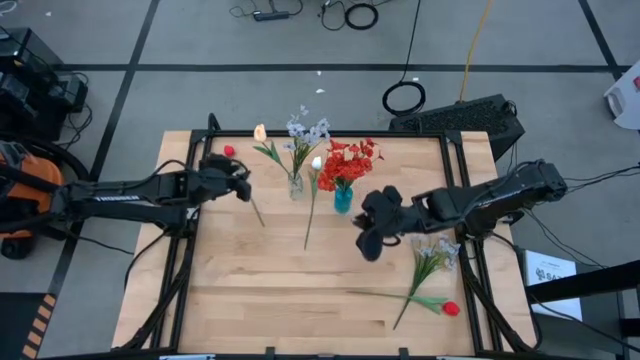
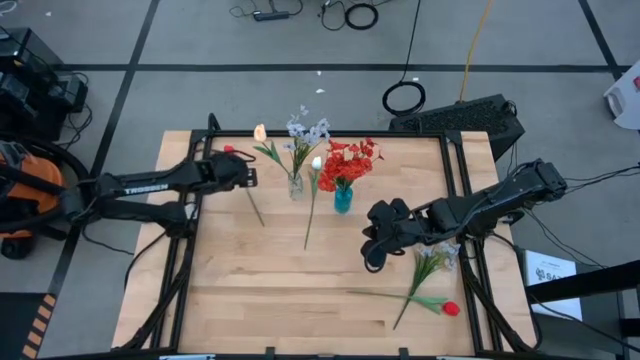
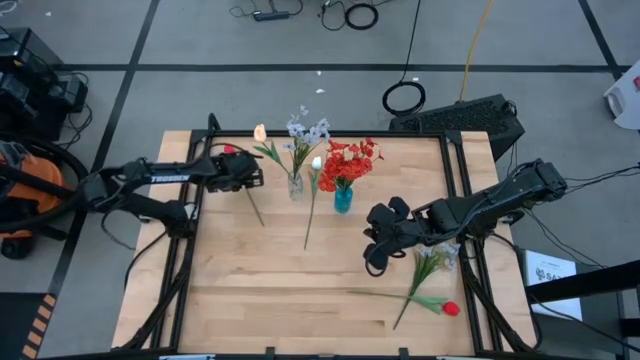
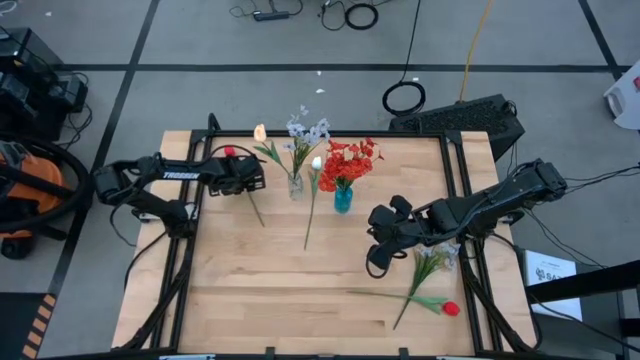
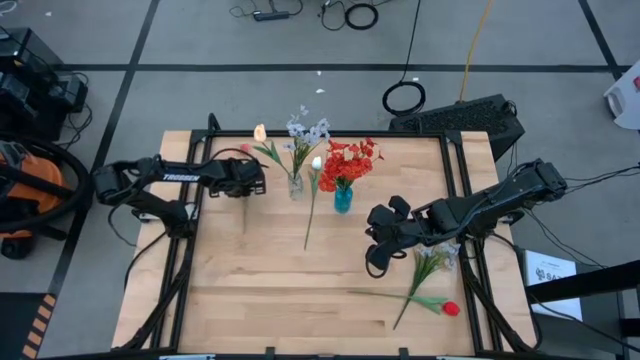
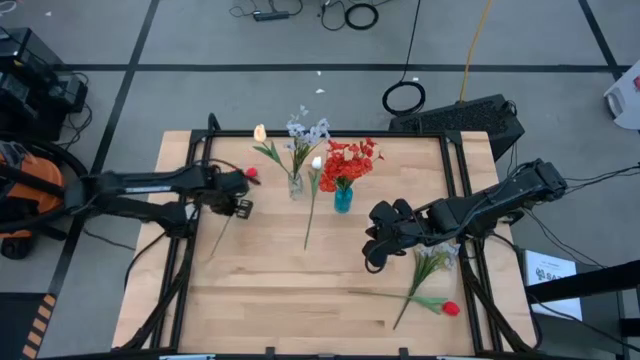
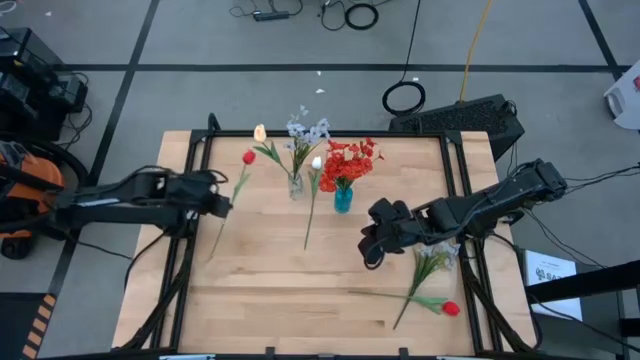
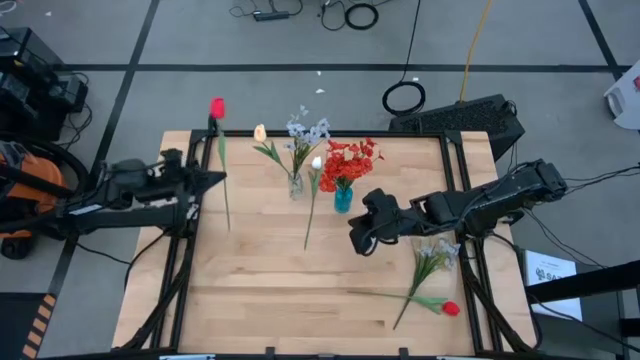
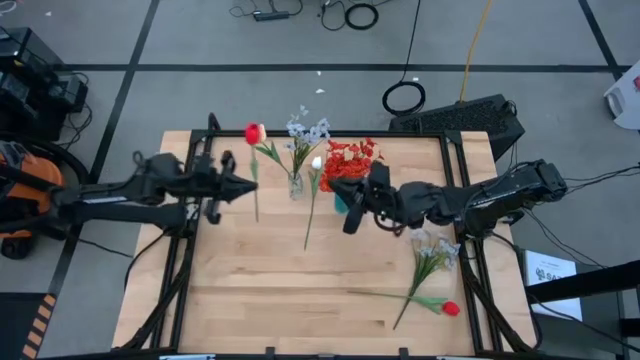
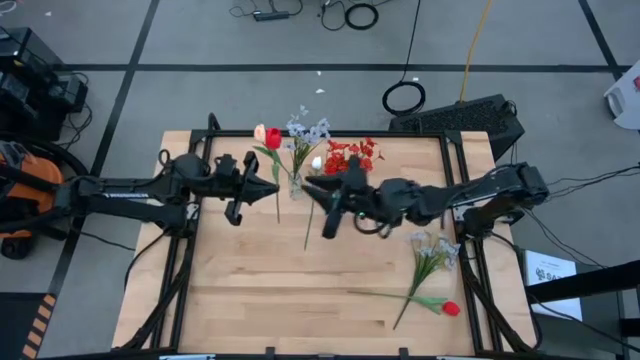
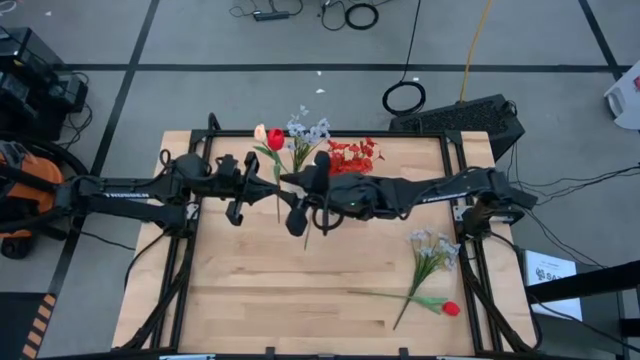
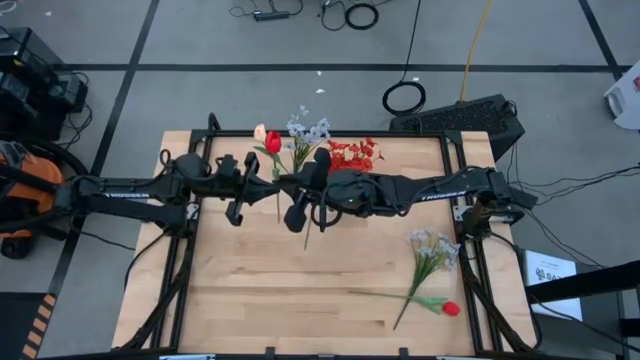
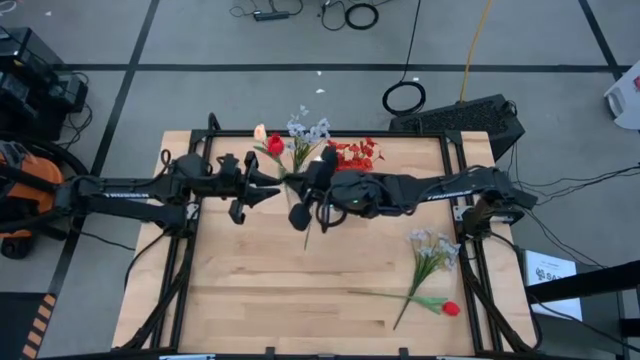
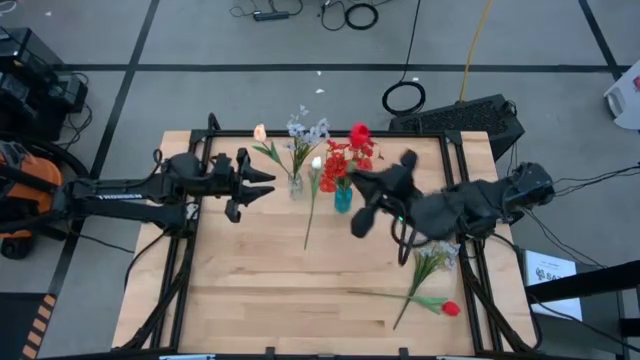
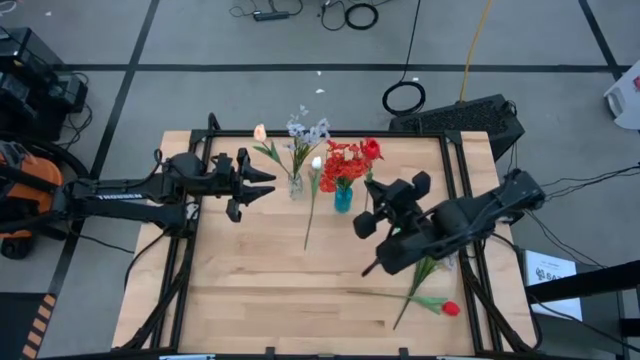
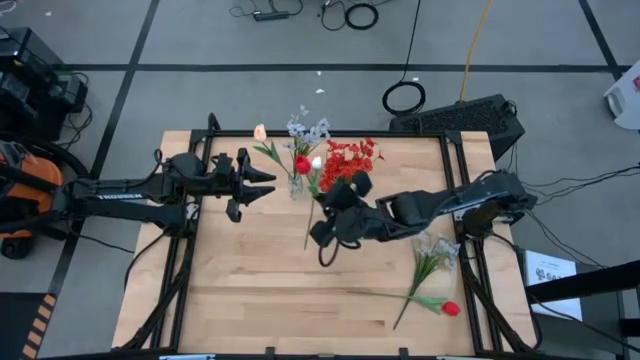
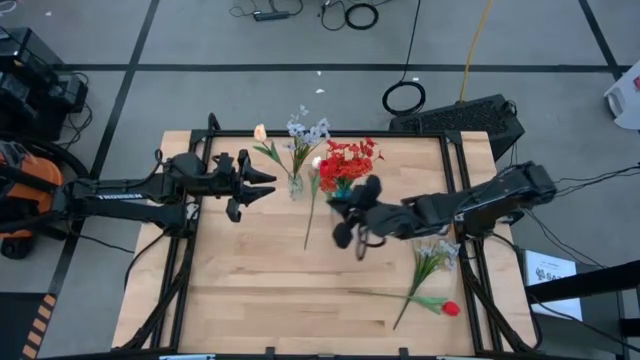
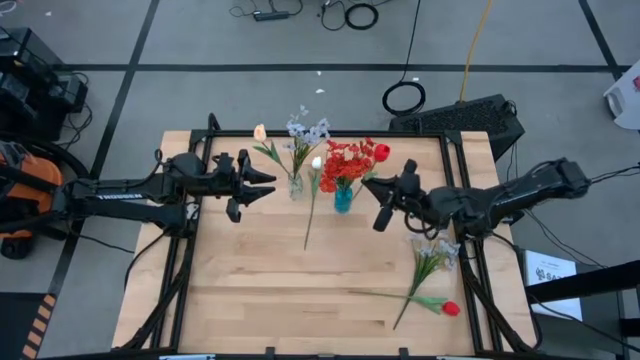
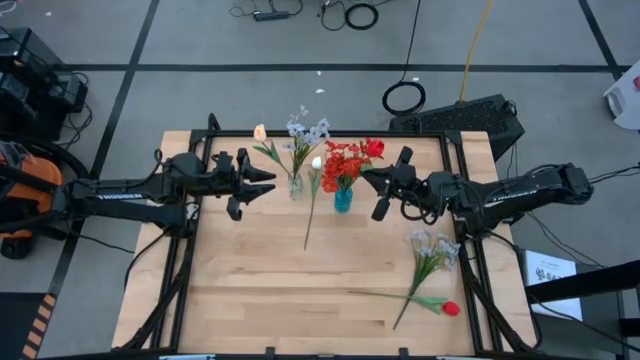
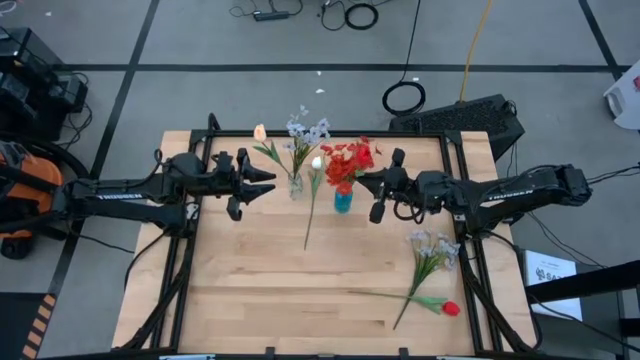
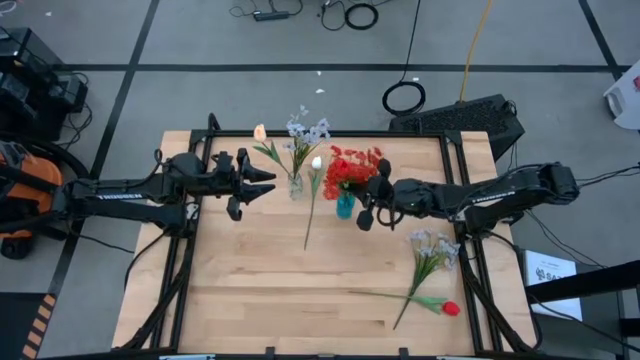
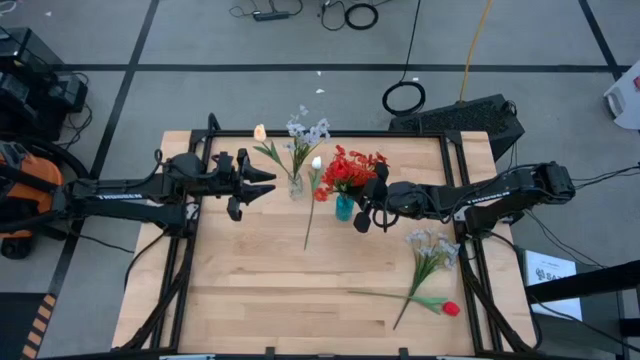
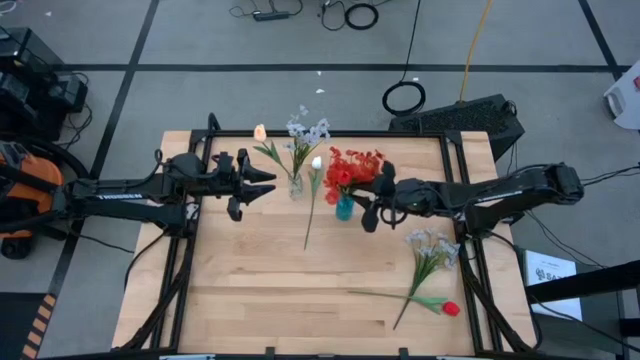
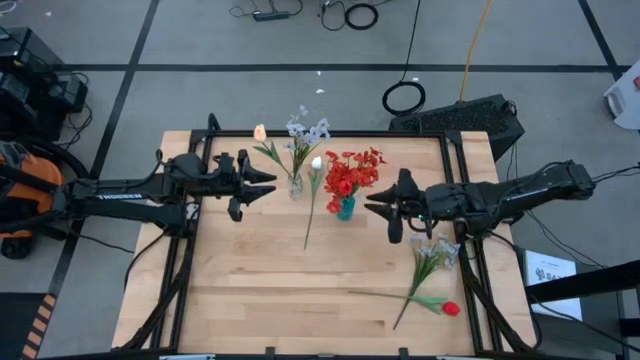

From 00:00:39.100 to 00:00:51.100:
Task: Sort flowers into vase by color
Put the top left red tulip into the blue vase

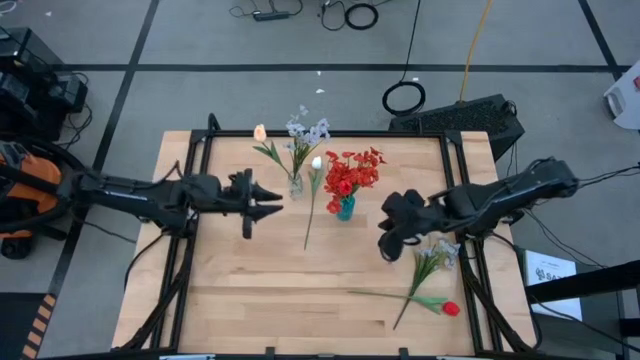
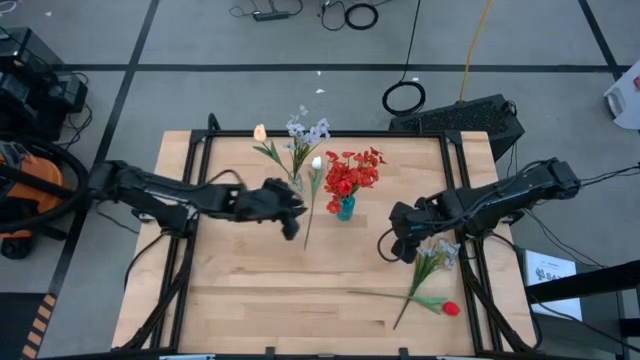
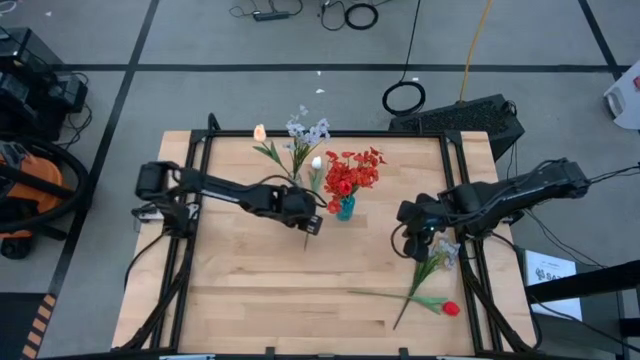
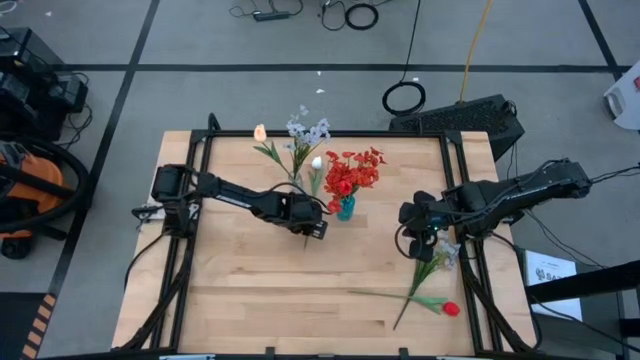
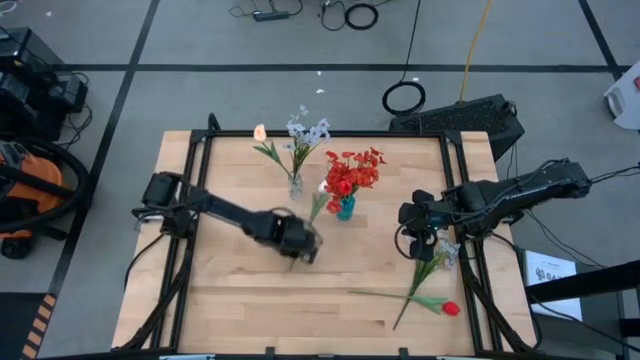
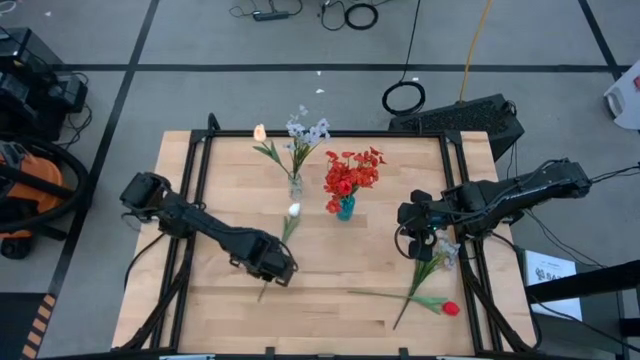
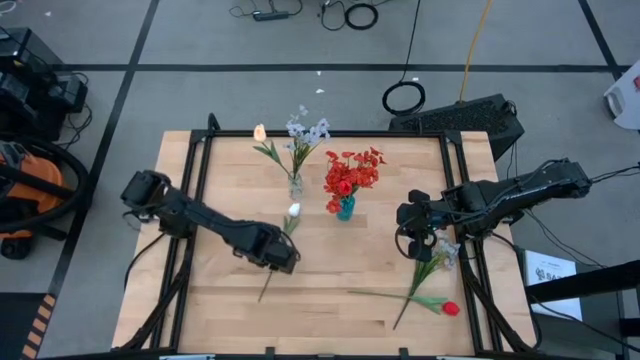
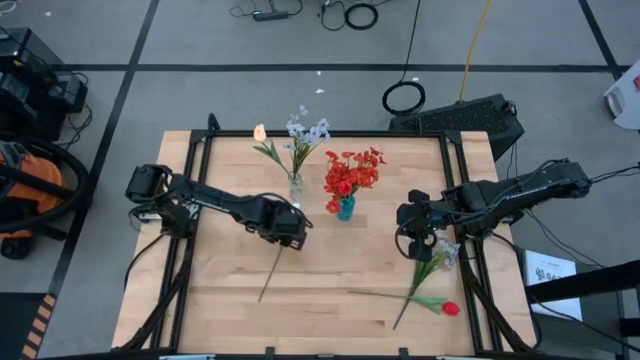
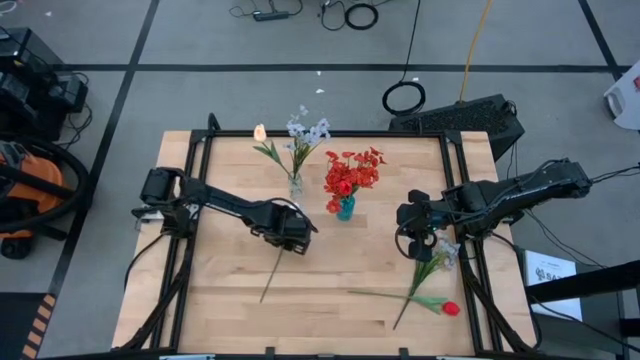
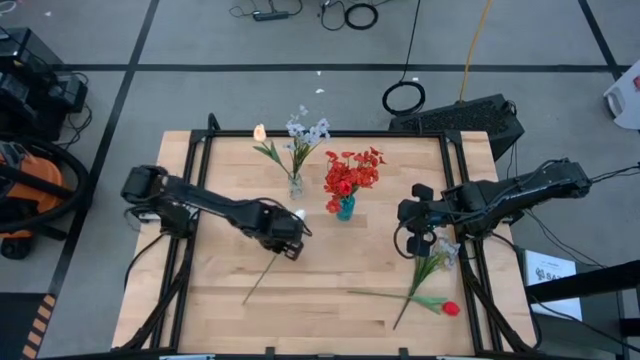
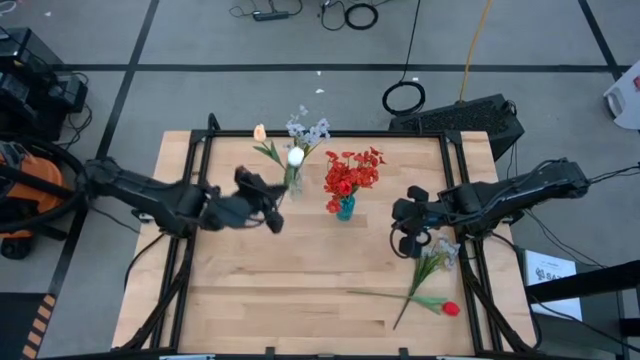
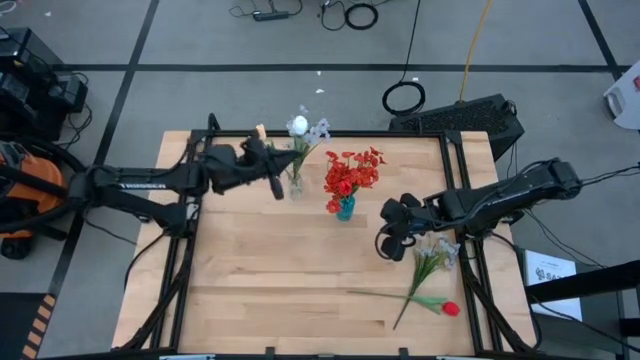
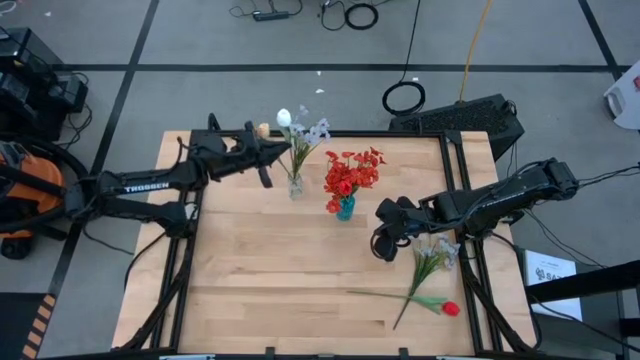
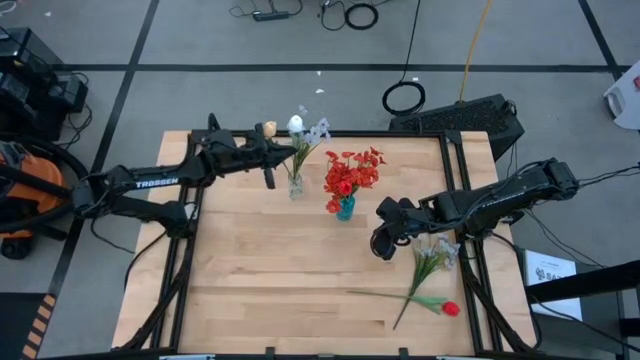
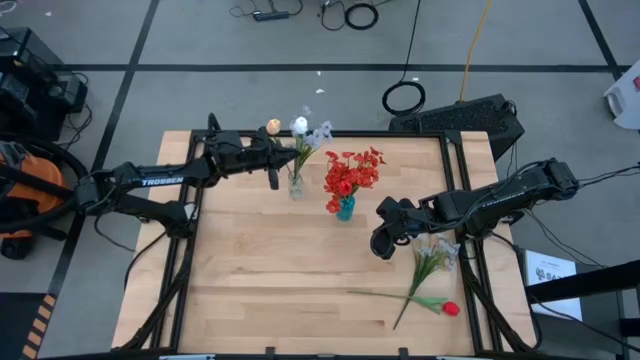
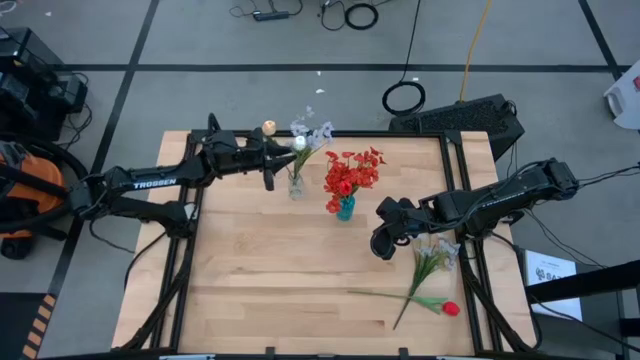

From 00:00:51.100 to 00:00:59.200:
Put the white tulip into the transparent vase

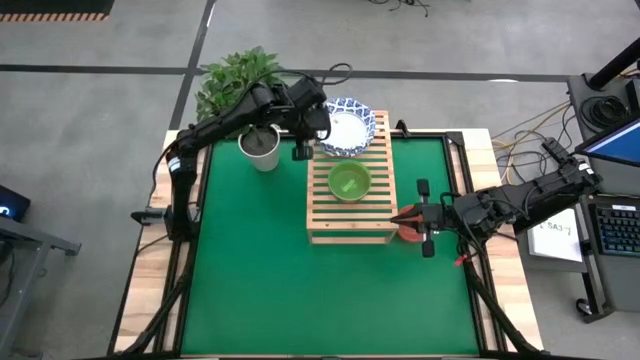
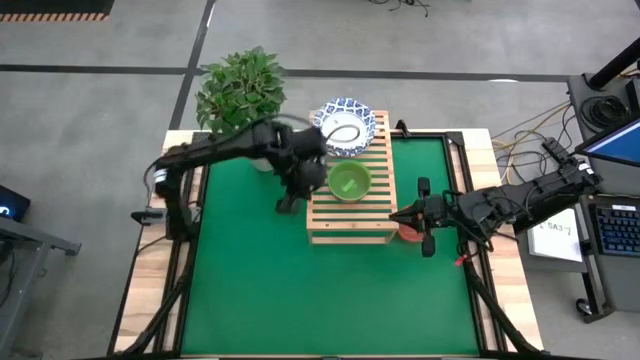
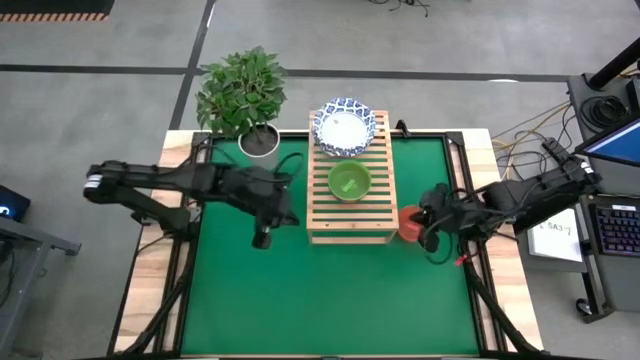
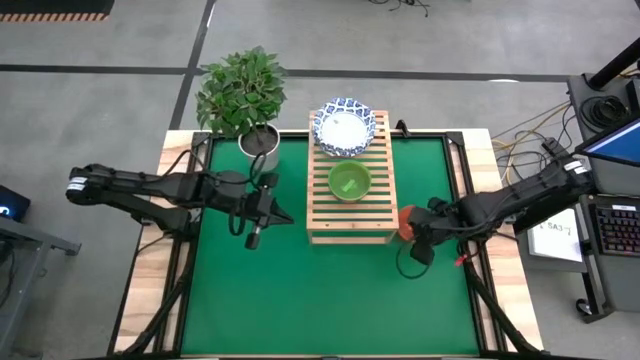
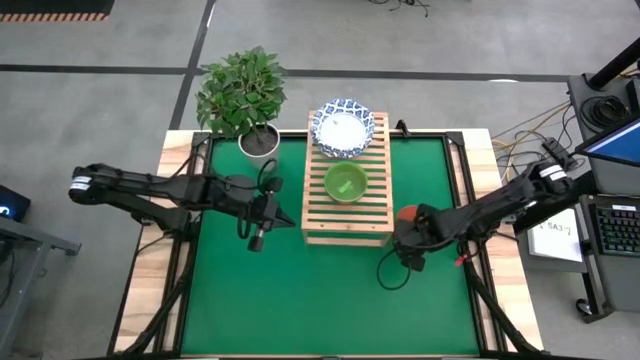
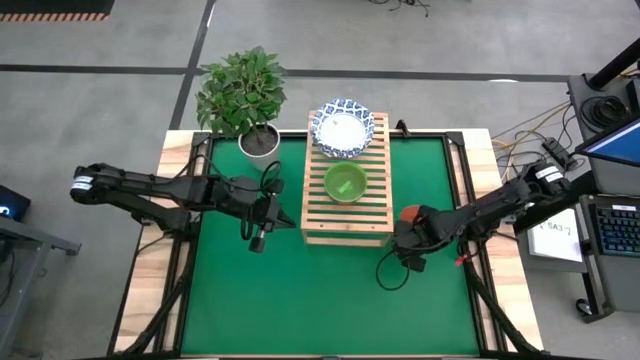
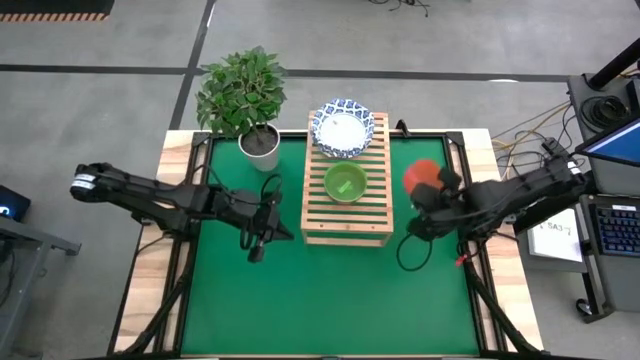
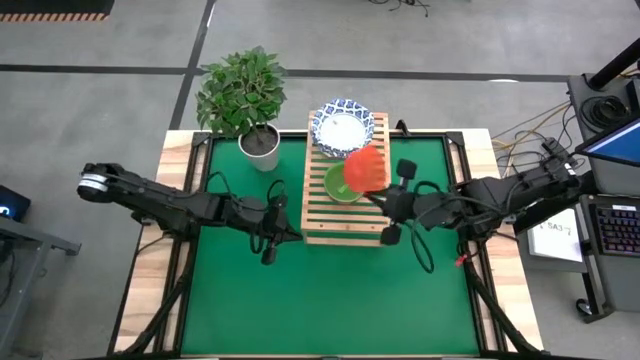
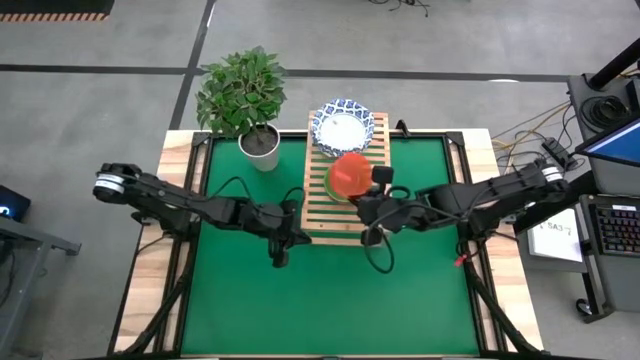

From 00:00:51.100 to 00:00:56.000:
Task: Place and stack bowls onto a shelf
Stack the orange bowl on top of the green bowl
